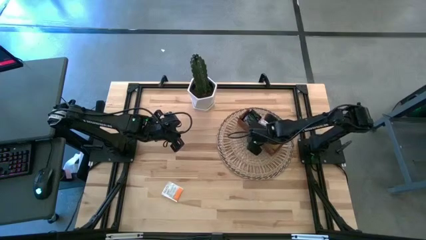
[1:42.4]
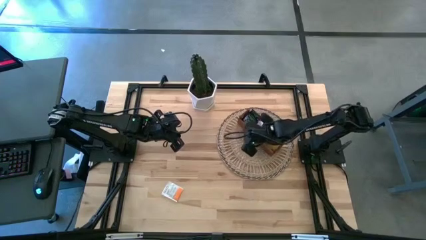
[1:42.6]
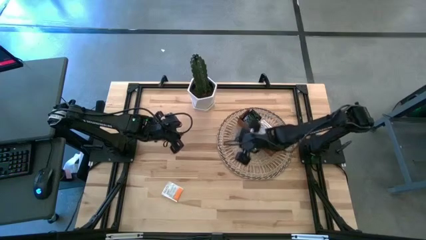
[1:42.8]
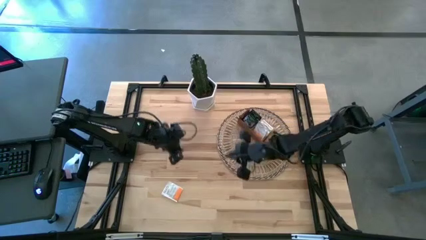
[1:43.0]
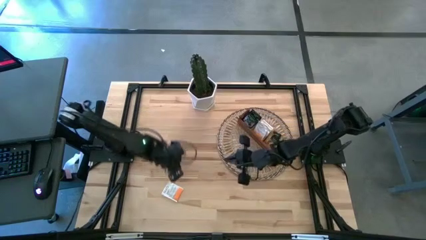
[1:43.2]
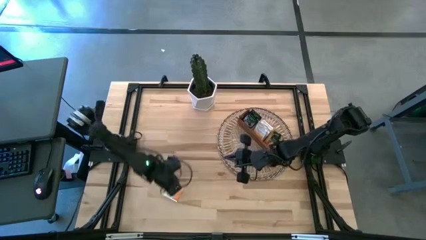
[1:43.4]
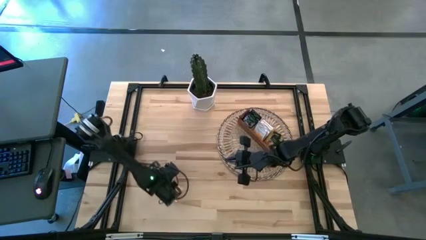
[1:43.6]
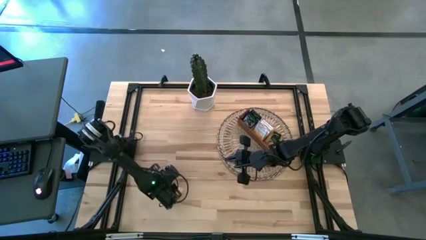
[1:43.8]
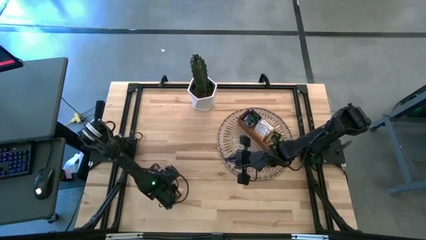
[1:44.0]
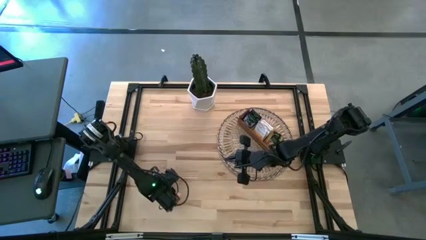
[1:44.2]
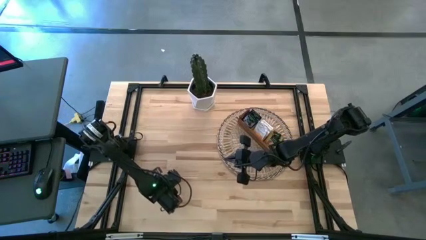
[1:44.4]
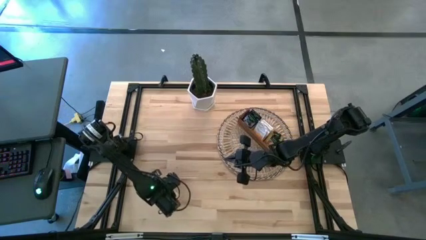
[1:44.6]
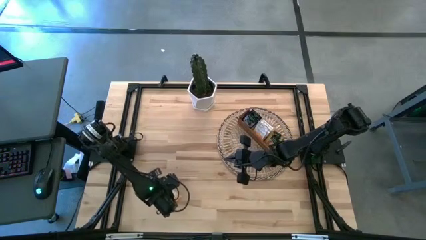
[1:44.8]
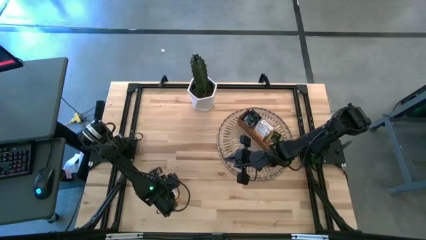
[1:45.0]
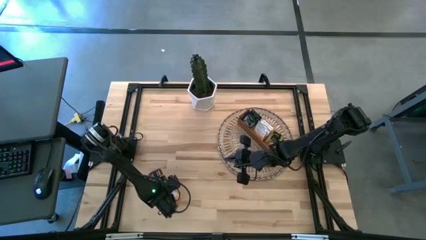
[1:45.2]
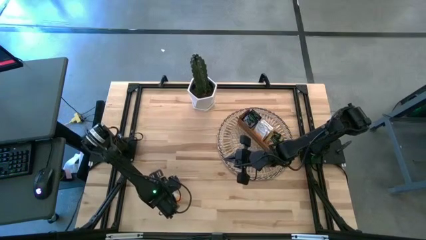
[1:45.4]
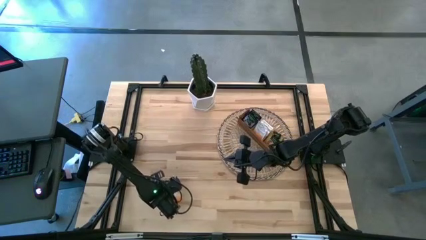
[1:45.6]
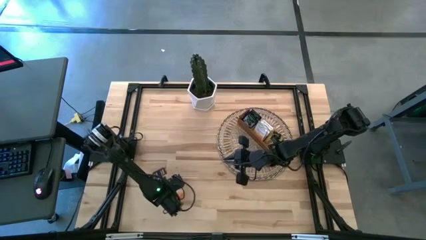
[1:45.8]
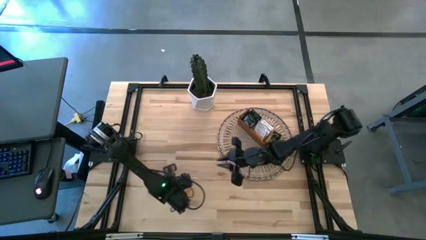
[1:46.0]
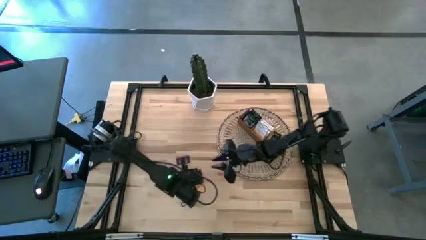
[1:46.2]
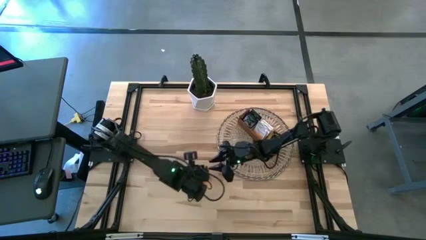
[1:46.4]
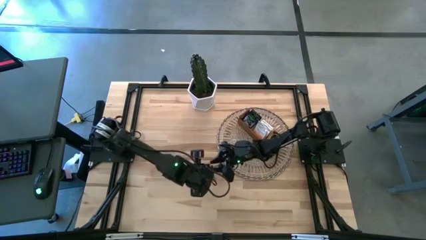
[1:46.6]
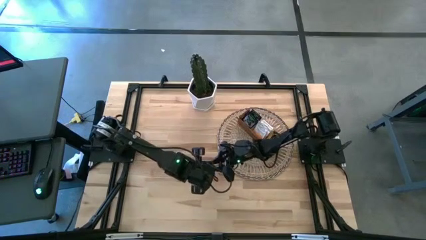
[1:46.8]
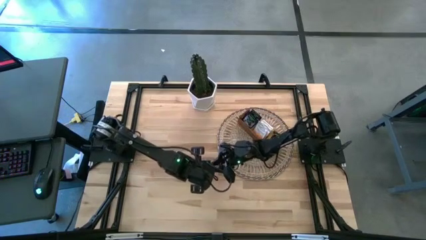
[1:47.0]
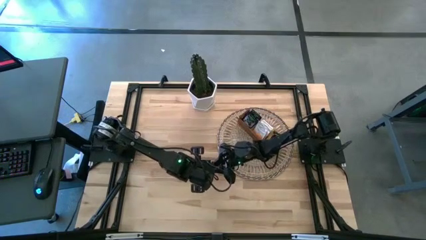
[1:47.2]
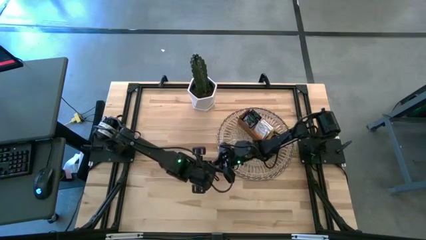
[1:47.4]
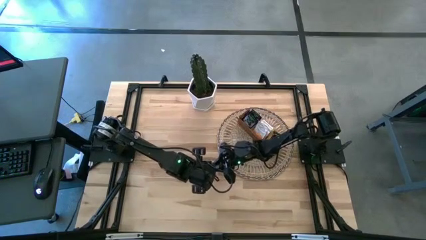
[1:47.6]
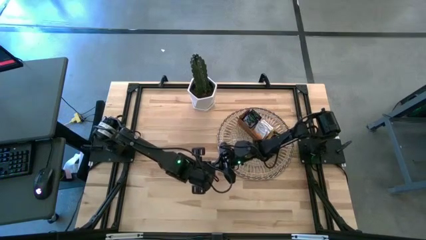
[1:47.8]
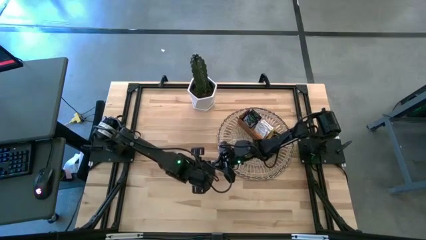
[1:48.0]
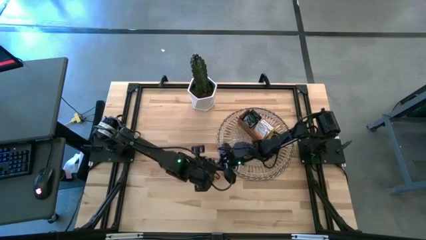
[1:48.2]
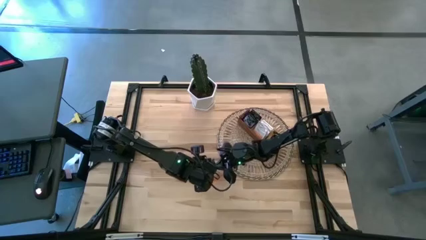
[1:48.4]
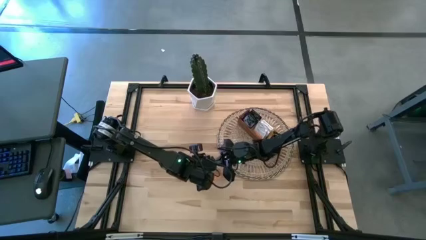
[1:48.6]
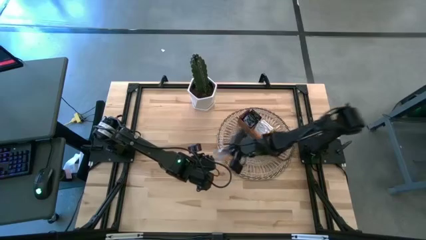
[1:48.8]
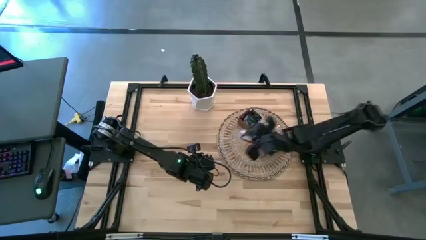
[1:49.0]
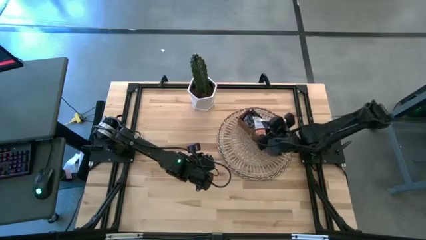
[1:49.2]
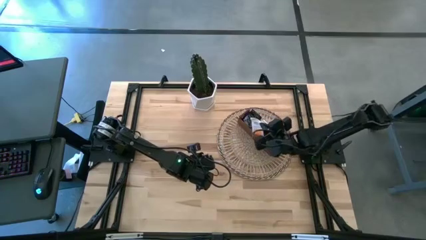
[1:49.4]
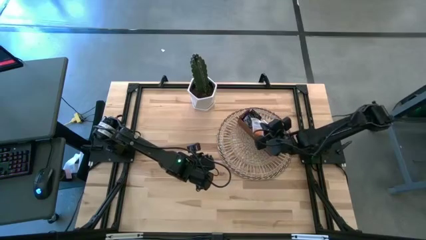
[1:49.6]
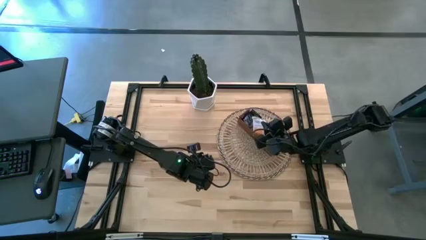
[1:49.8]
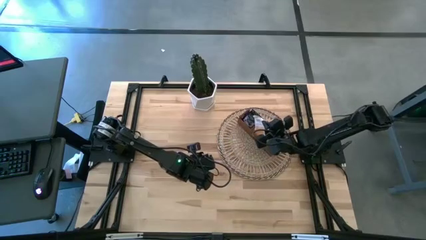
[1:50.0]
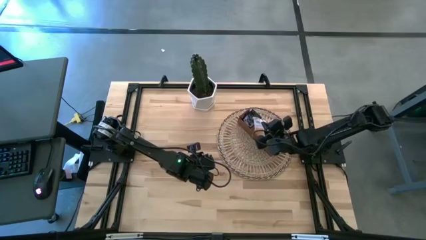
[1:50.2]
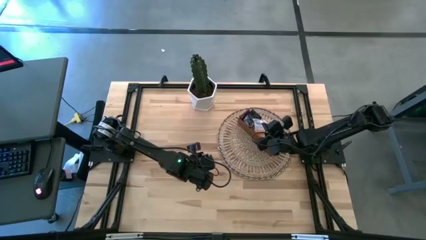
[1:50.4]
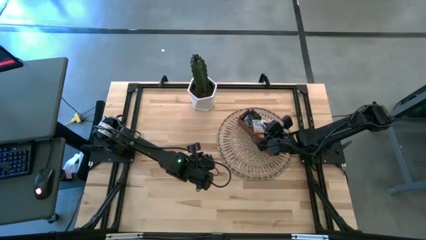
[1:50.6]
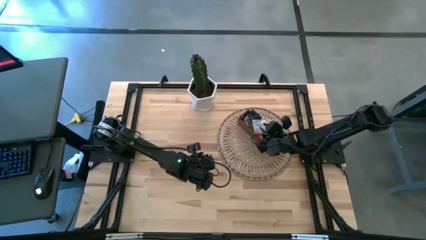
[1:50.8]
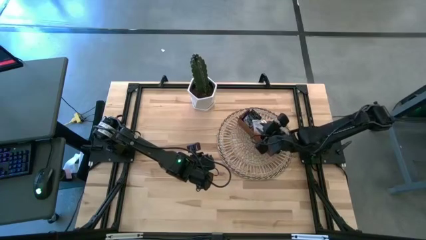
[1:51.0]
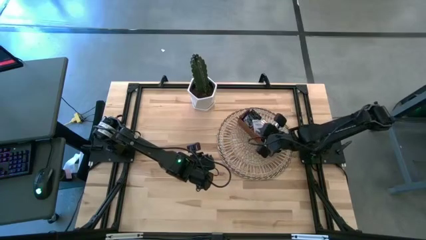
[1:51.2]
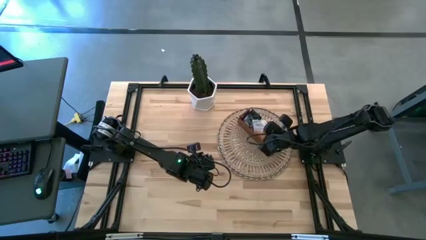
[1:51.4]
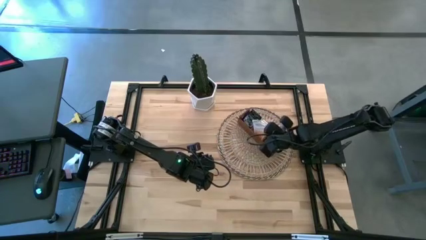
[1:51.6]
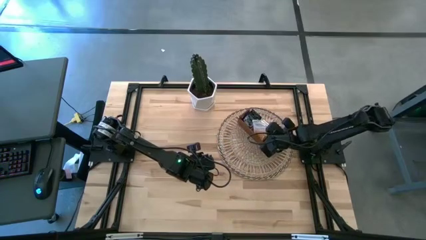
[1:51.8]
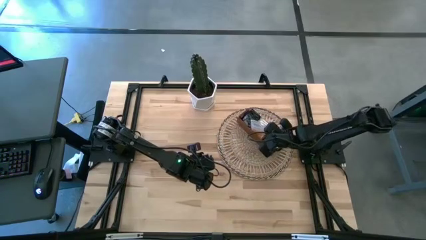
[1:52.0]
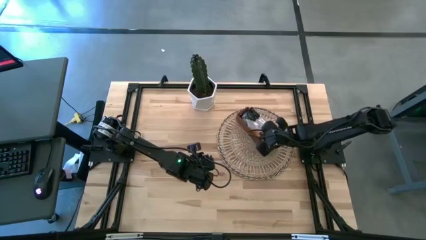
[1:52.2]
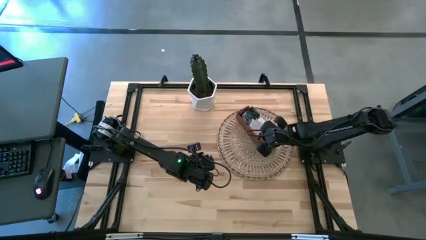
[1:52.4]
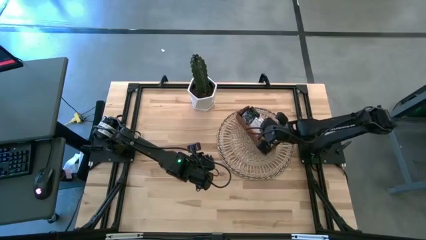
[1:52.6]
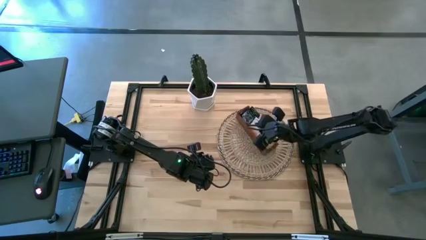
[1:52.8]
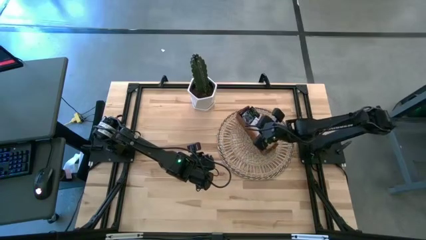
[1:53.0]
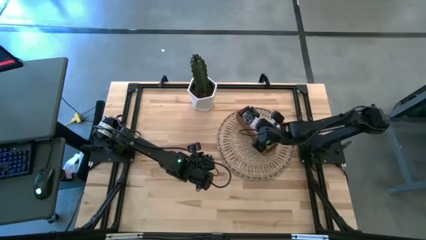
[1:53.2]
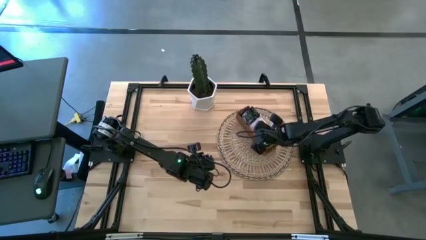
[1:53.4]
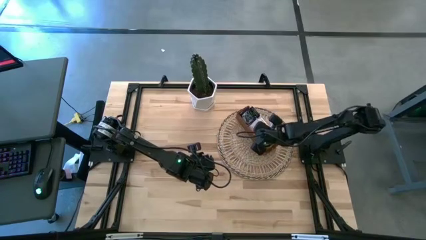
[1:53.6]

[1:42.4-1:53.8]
Task: Pick & Place Tea
Put the white tea bag into the middle section of the wooden organizer
